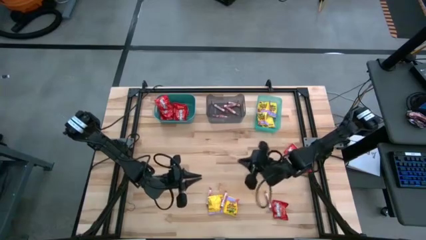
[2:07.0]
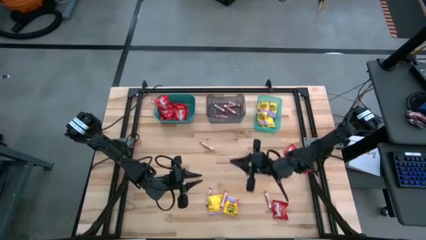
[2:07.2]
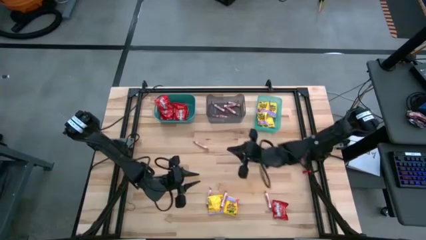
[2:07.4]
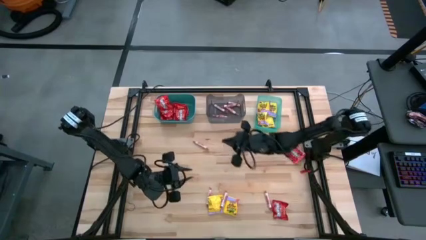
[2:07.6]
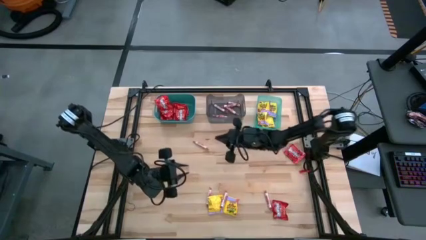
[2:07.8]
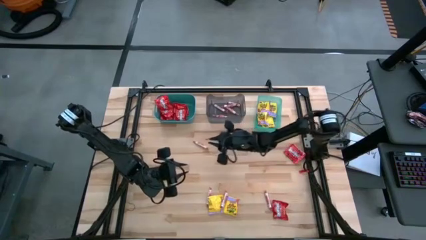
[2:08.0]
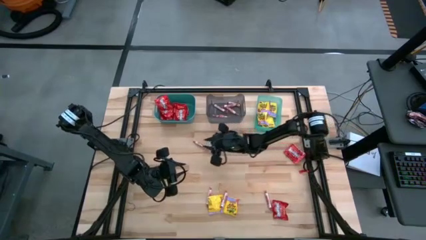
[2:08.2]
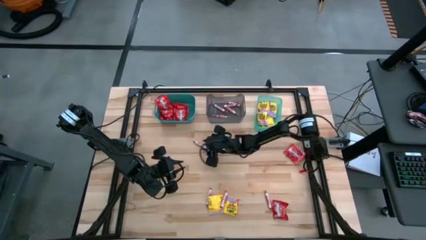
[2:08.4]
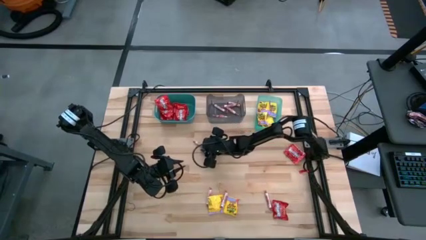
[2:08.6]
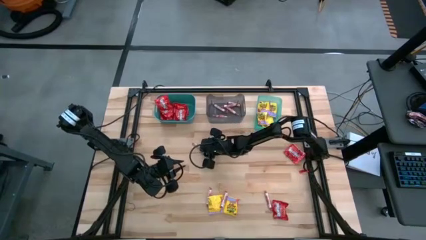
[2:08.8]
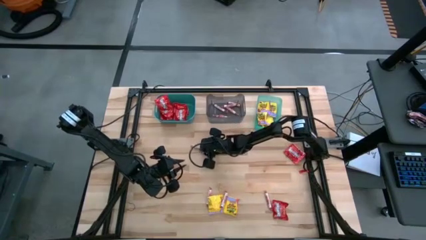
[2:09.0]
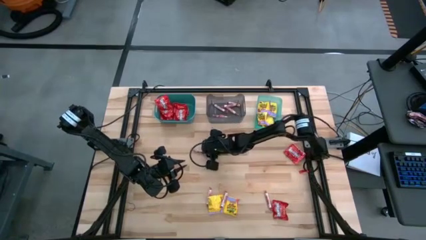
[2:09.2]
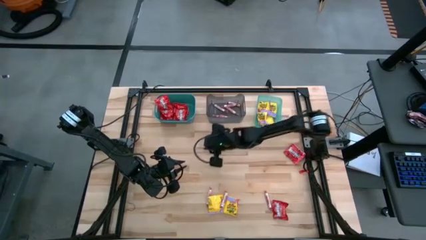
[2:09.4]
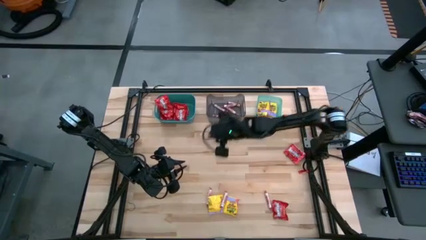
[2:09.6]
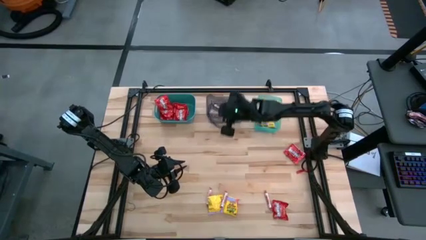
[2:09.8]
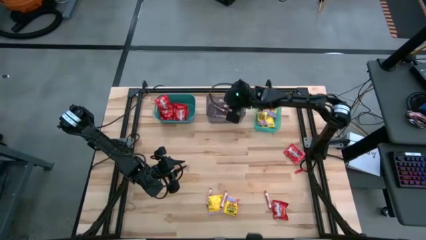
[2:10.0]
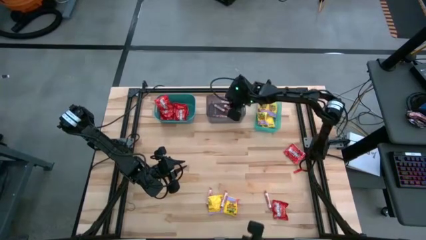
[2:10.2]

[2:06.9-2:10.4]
Task: Sort candy
Put the white candy into the black bin

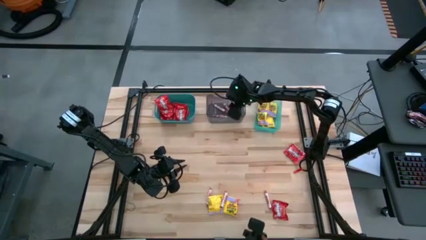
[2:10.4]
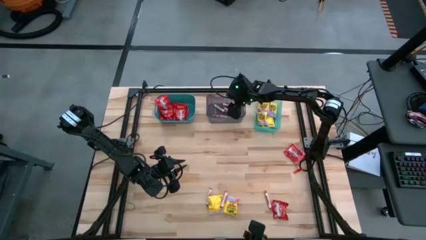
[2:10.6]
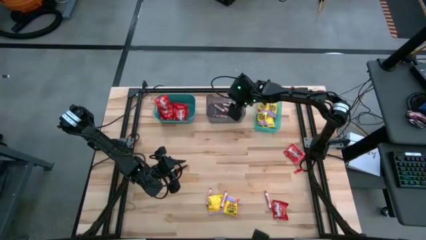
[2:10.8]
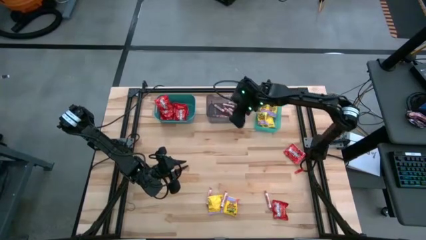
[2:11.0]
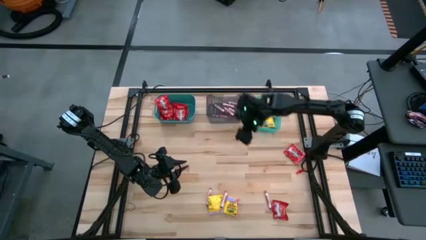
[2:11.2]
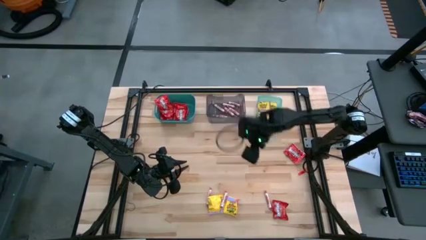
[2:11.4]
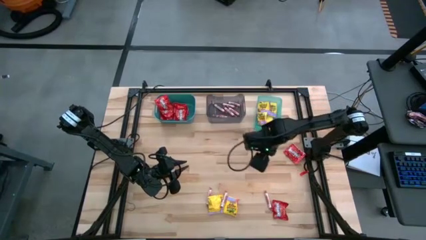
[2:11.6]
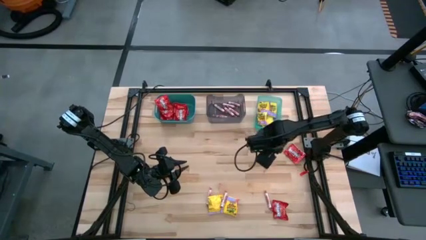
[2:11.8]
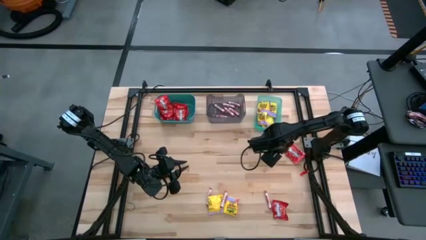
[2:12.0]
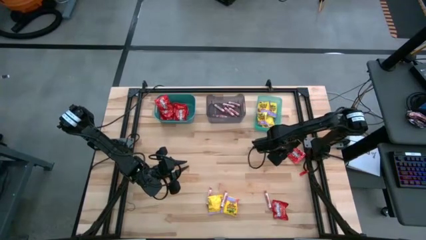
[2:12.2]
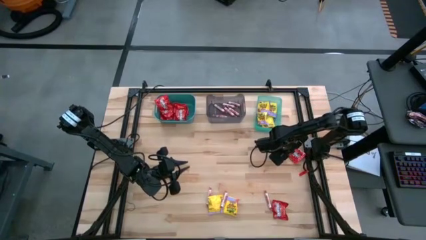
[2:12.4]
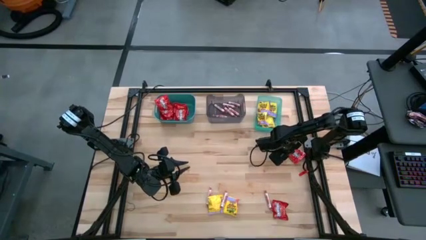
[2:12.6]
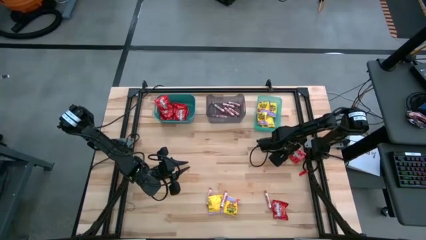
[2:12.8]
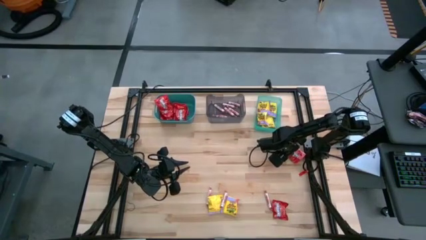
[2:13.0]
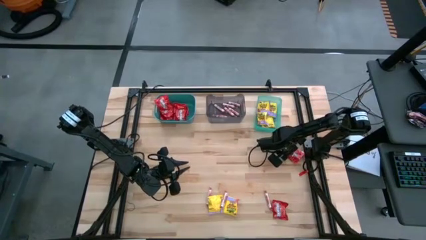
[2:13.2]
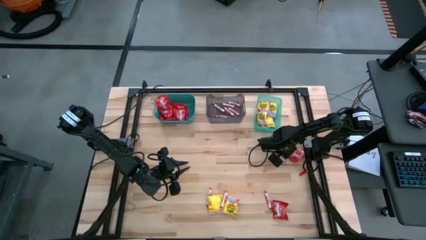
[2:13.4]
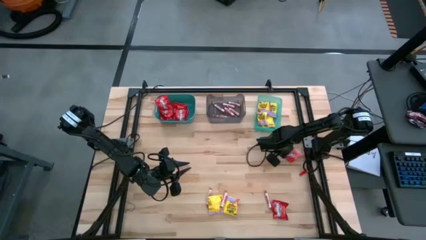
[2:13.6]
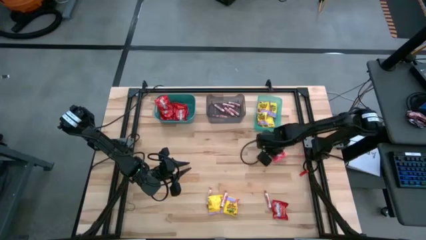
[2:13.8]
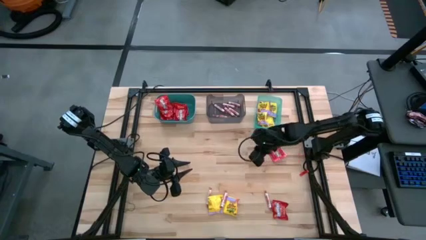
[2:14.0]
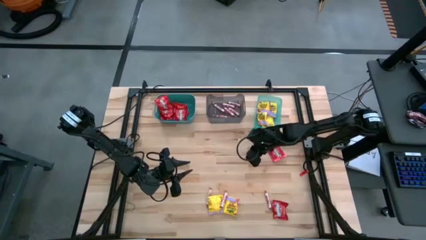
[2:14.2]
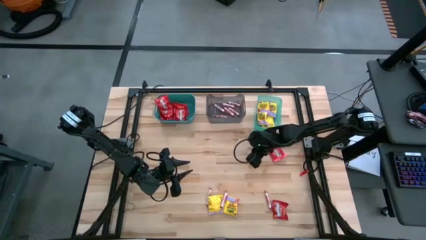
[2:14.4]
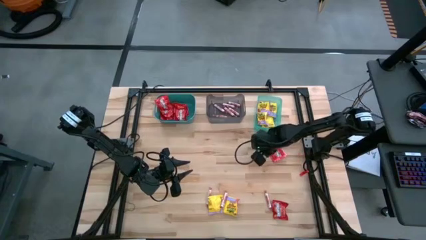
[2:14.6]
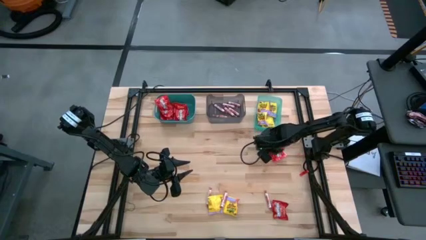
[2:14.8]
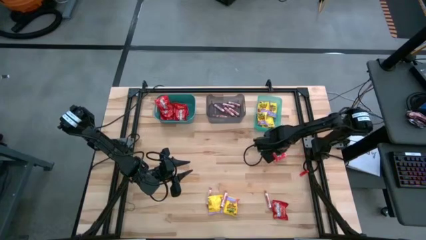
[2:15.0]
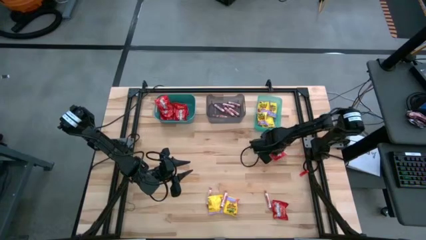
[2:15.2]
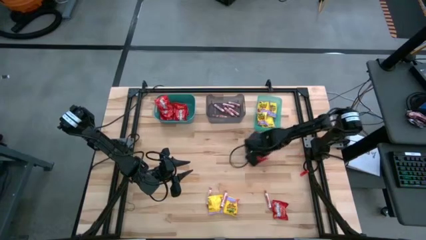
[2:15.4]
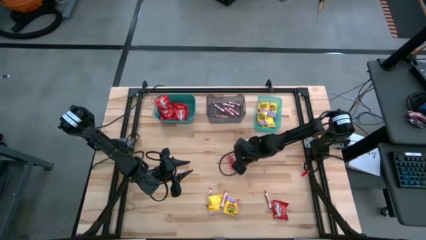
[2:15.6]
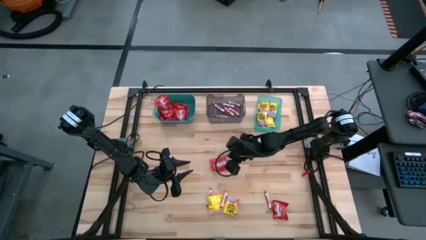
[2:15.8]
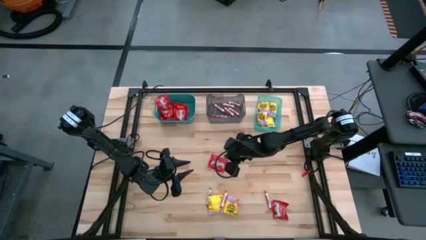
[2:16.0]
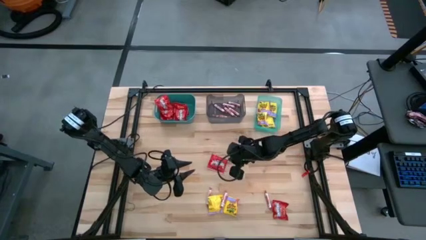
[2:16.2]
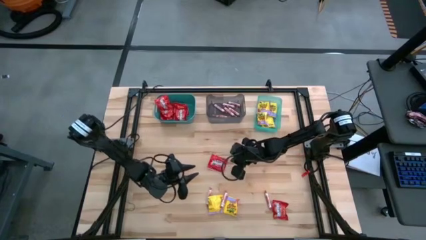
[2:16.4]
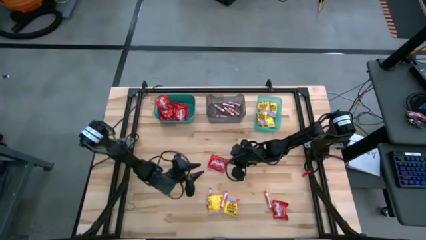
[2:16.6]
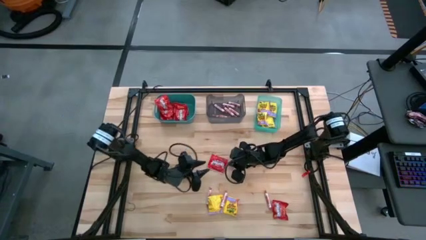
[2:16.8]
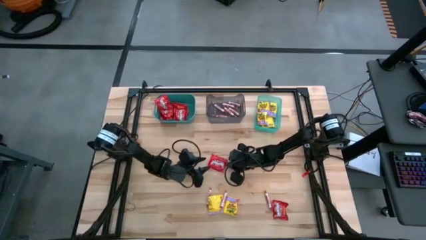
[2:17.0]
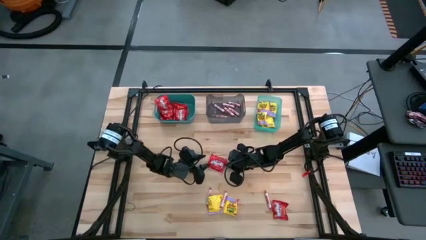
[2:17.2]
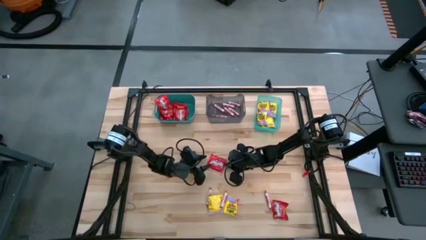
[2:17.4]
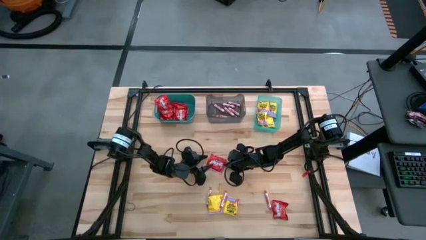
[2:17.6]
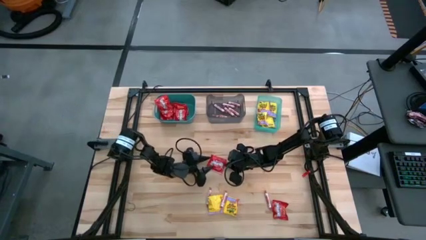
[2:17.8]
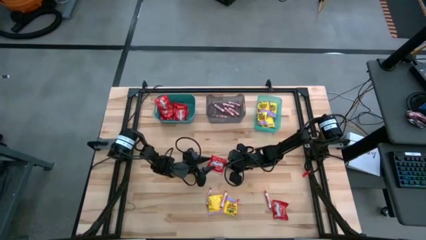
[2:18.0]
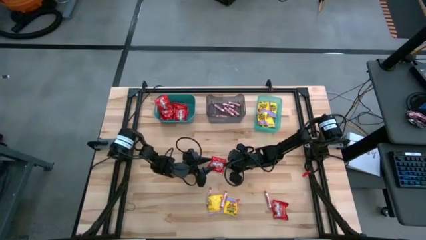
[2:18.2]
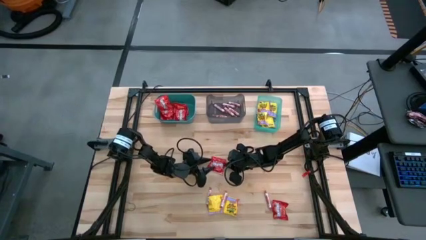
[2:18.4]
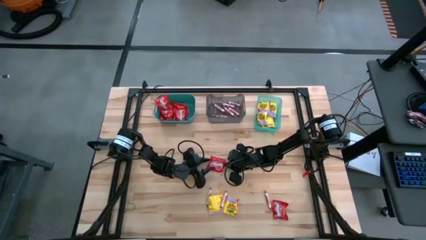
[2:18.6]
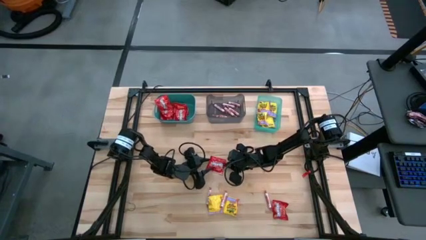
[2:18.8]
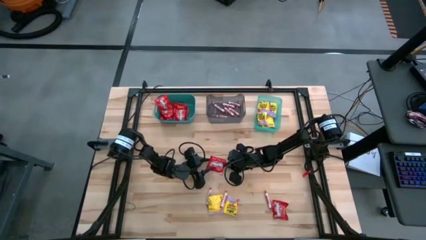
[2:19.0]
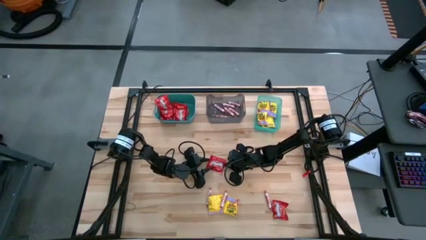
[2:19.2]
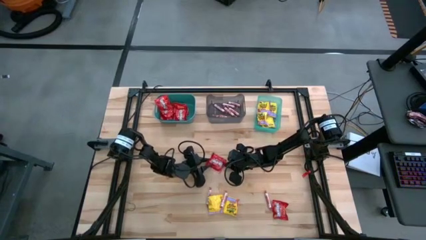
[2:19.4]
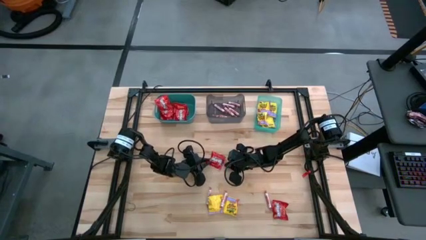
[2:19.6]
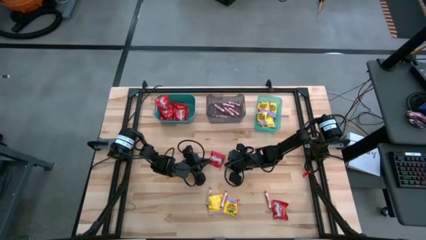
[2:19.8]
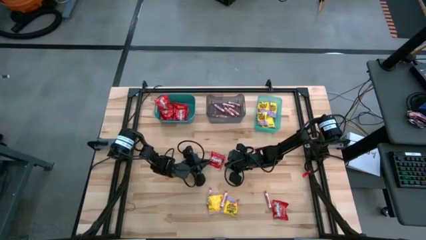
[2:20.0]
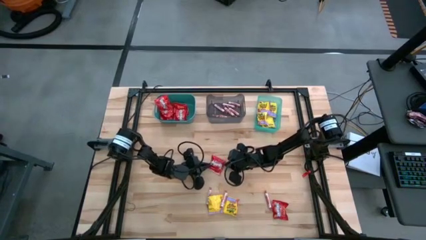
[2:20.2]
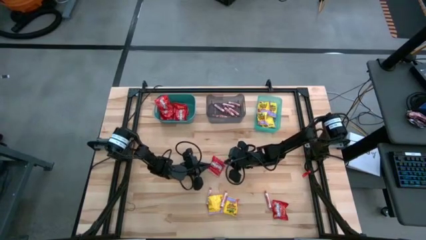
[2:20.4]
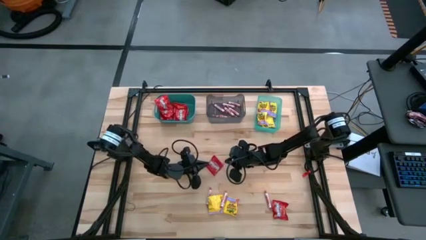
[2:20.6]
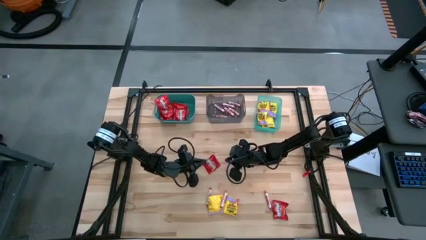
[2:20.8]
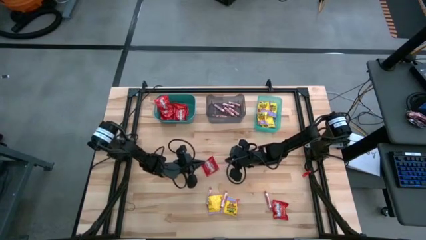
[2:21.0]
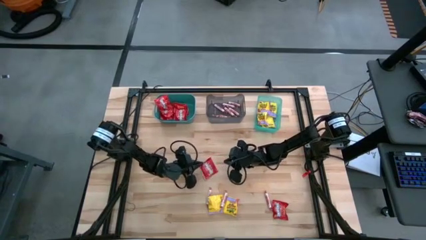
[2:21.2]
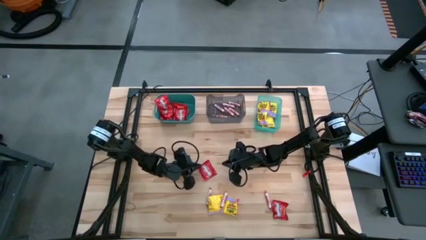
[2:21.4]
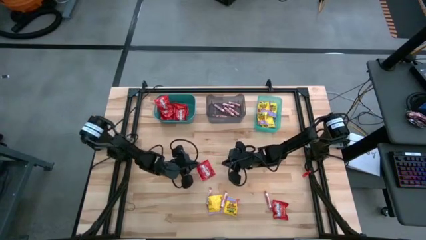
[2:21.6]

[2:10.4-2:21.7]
Put the red candy into the green bin

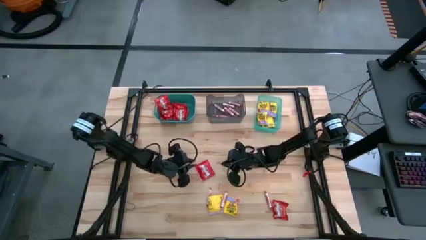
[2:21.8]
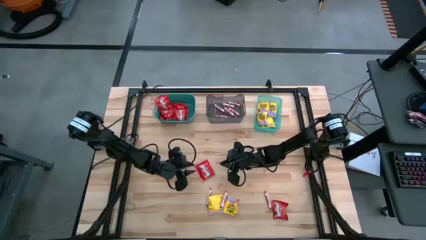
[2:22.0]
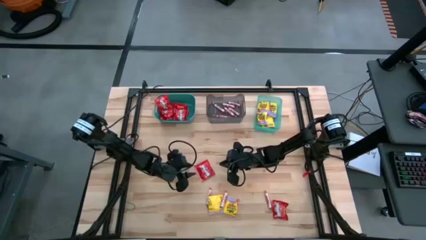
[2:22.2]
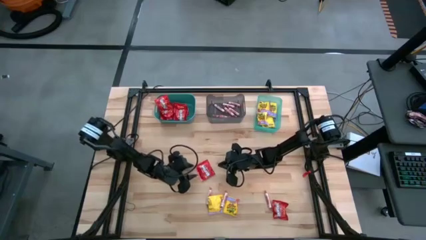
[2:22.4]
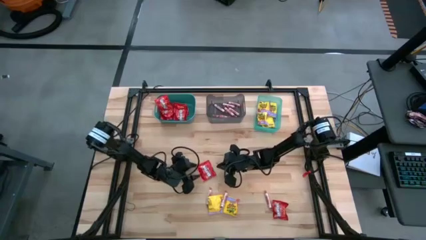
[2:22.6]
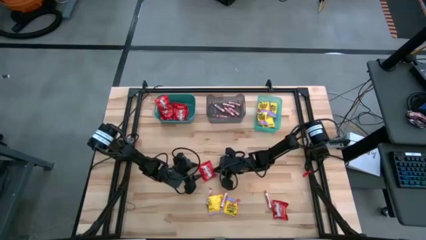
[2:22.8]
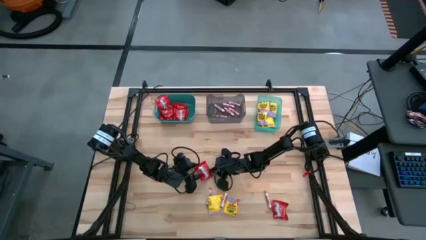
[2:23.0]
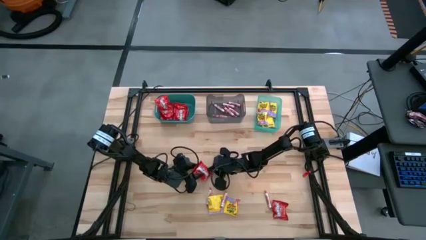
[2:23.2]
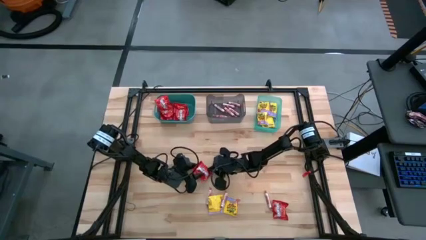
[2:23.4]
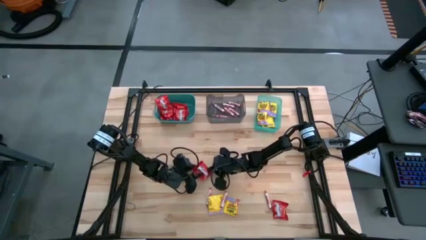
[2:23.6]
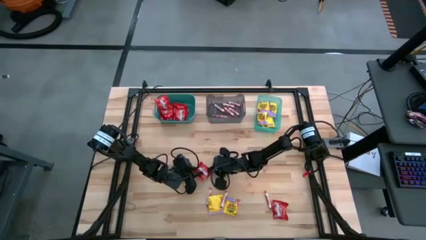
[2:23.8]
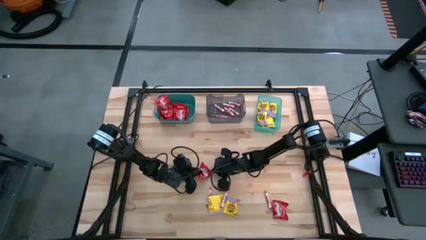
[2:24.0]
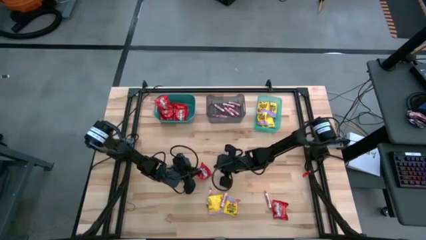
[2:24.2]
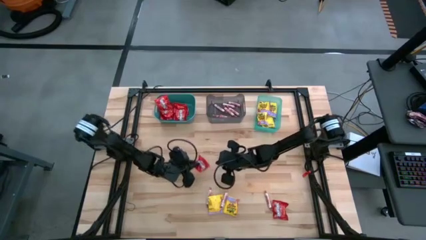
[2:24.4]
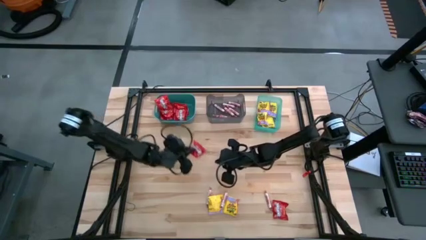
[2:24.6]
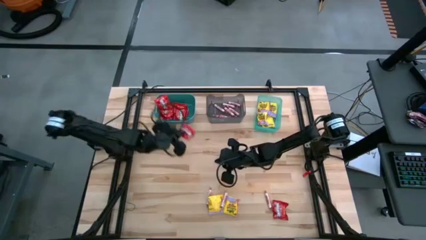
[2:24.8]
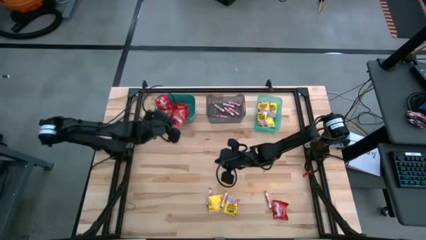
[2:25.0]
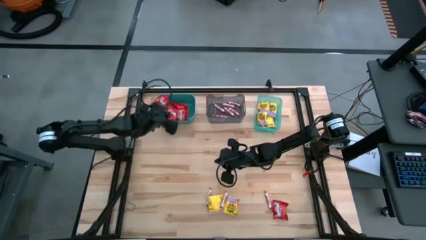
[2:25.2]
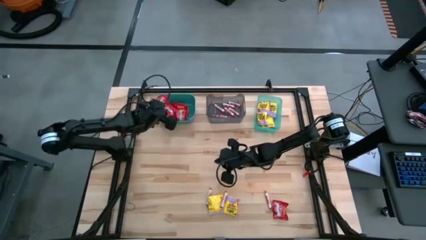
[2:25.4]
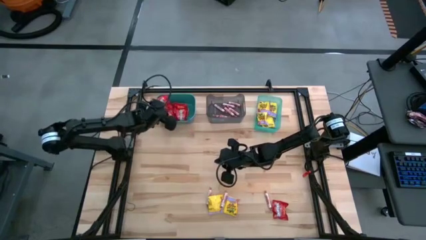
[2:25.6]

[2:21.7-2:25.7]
Put the red candy into the green bin
